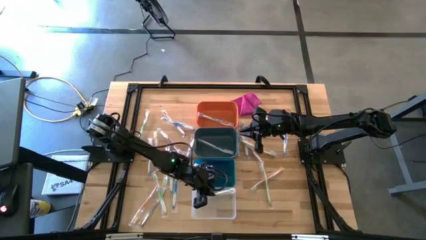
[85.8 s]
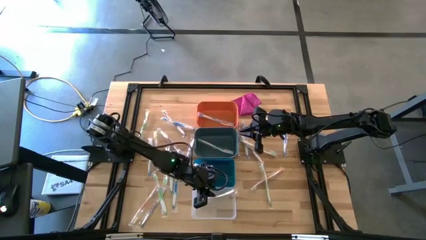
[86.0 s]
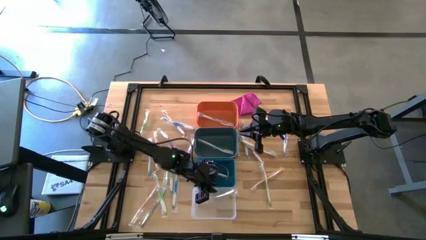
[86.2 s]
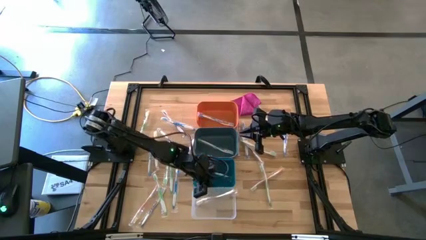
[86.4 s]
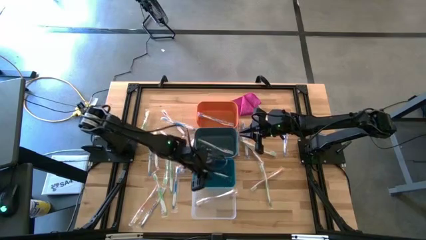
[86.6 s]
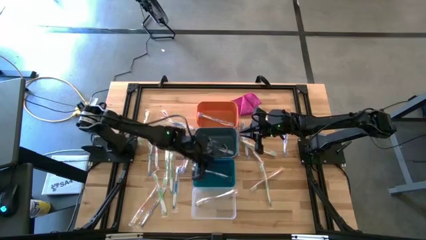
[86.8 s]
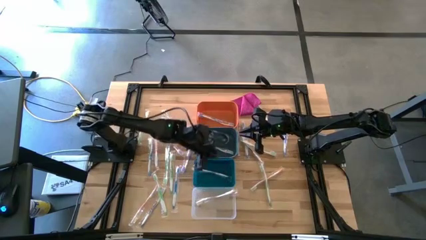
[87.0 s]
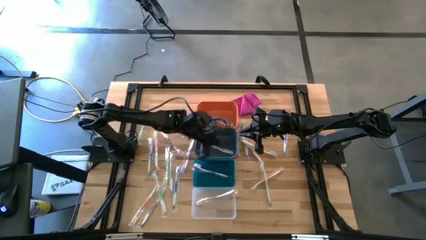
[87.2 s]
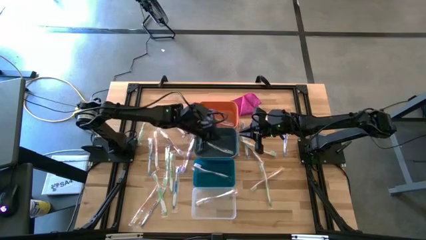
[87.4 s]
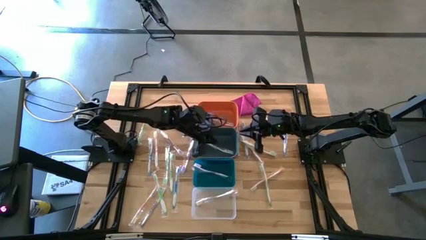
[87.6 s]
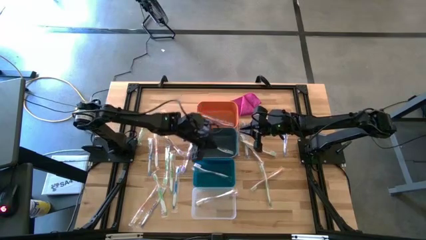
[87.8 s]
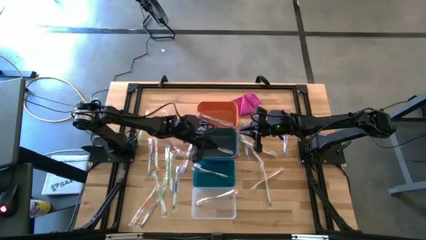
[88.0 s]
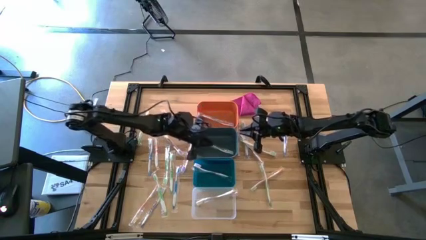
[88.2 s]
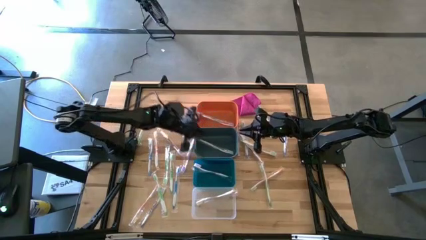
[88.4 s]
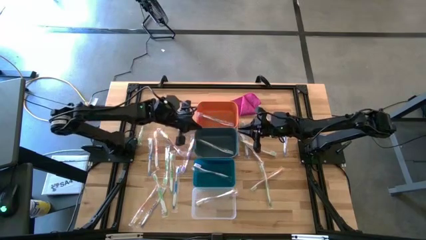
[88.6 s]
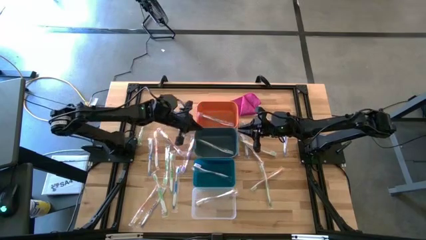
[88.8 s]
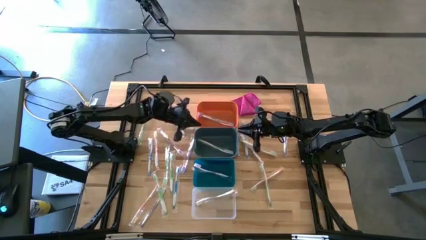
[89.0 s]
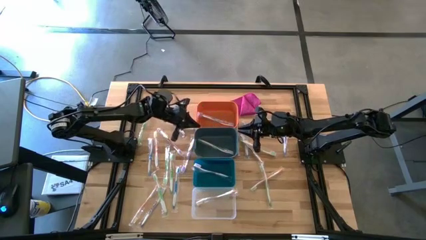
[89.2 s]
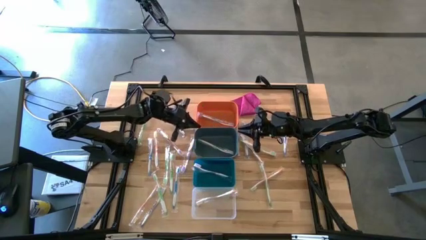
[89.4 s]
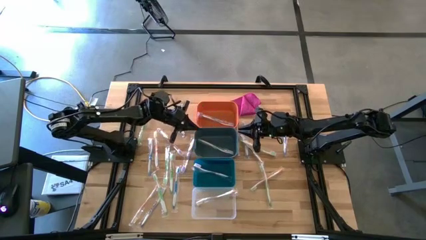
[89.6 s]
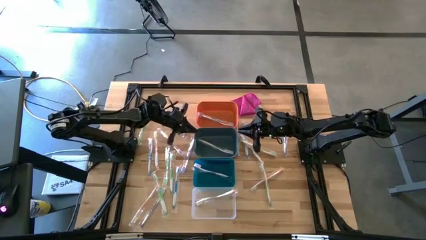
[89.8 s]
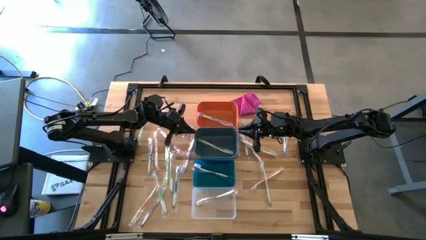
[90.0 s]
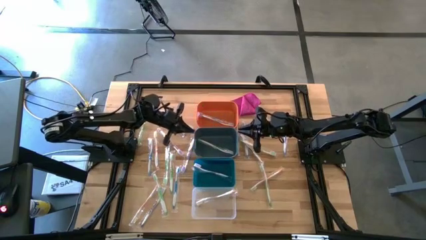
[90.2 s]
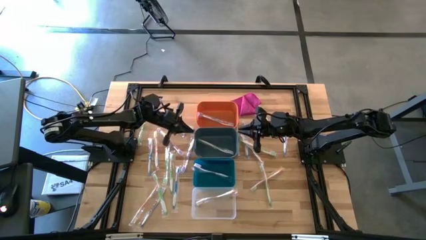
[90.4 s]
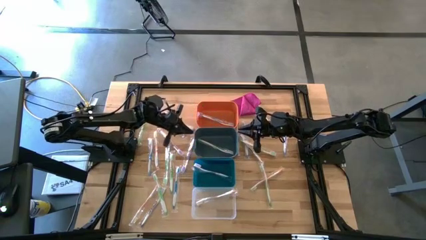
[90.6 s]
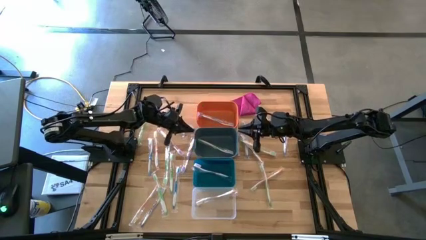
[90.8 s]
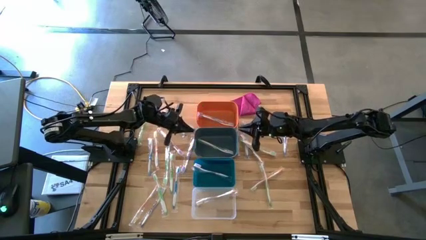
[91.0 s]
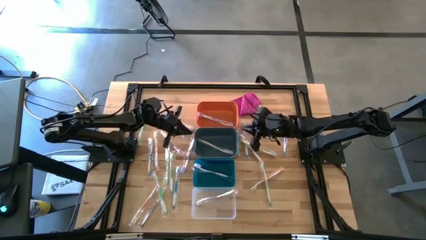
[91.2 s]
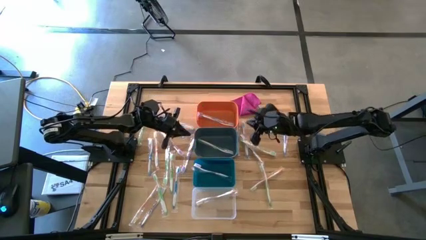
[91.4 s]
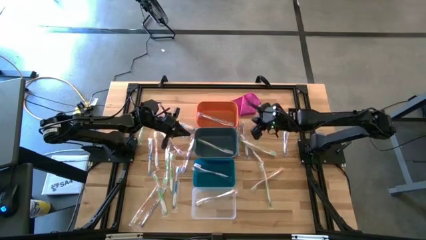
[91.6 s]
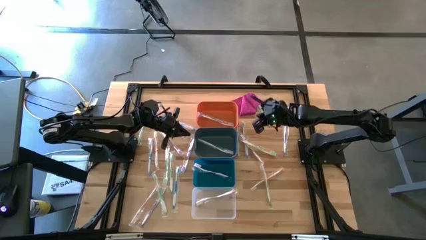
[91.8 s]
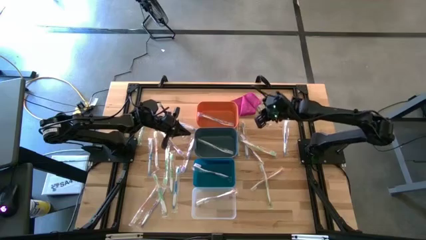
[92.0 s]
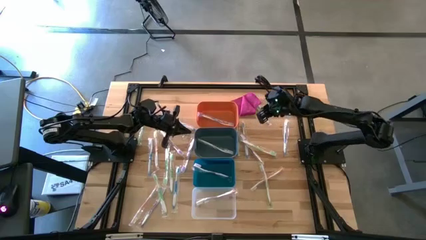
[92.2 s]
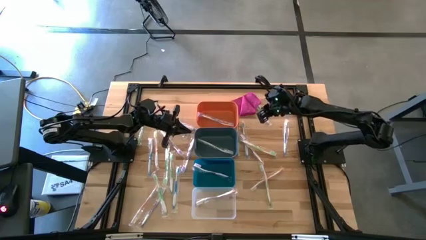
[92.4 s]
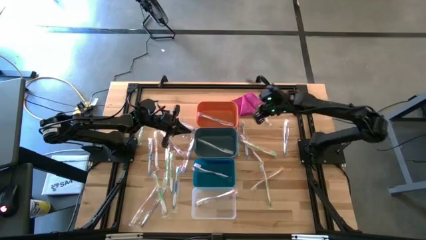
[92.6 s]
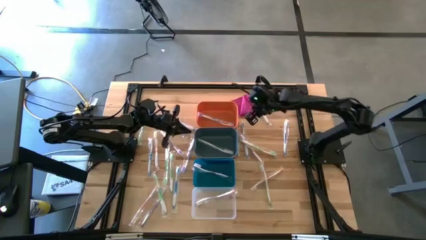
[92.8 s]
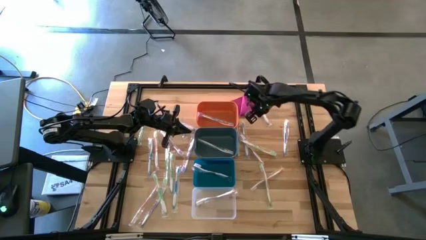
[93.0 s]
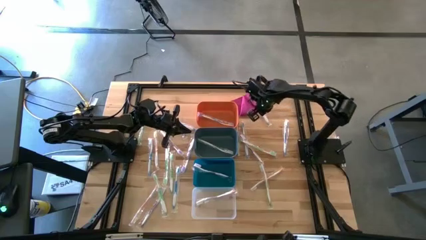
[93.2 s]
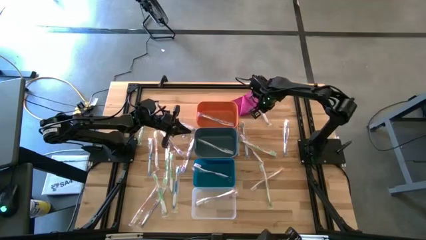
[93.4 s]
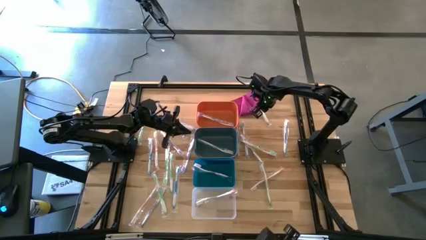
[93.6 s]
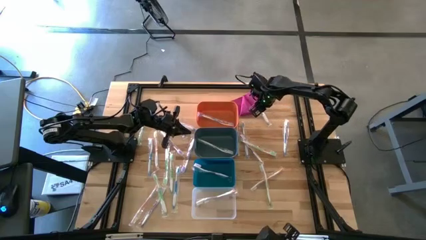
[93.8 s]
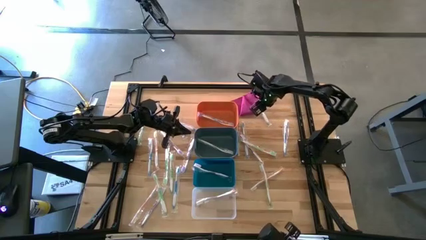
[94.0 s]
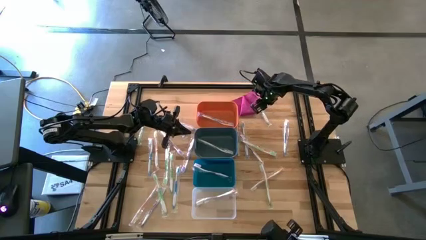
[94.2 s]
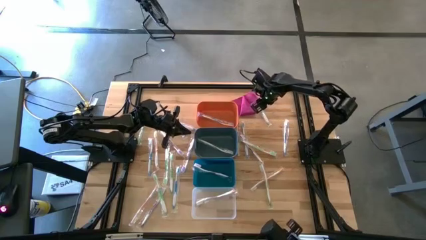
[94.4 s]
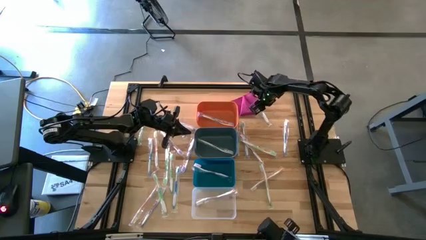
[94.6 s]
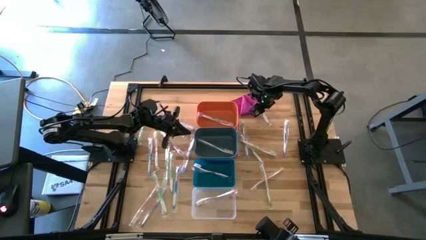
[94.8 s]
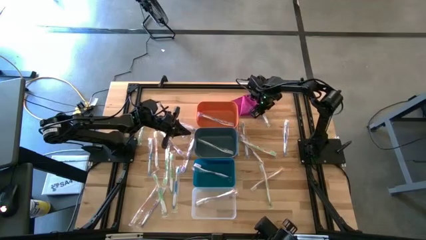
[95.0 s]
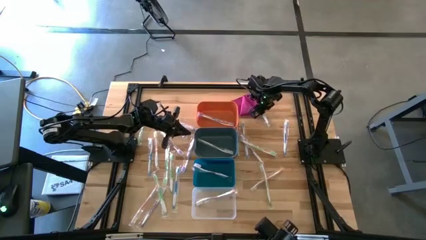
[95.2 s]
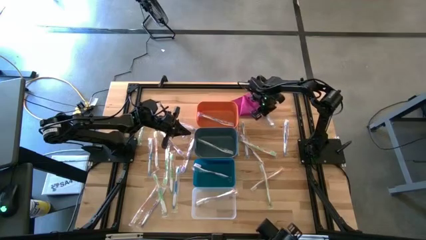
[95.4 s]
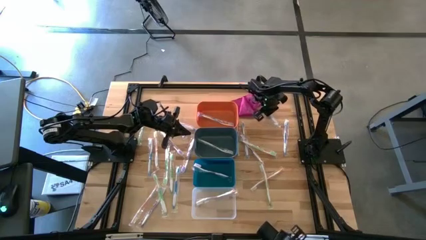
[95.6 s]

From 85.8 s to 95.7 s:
Task: Pick & Place Toothbrushes
Put the green toothbrush into the green bin

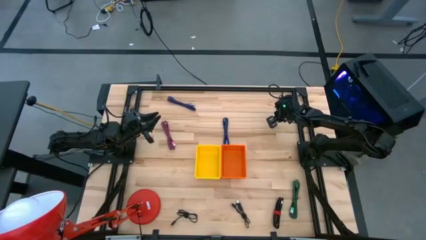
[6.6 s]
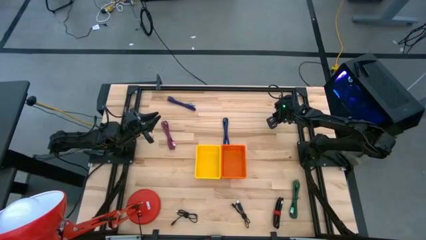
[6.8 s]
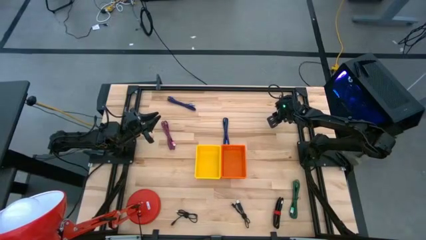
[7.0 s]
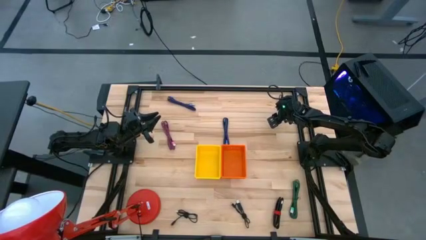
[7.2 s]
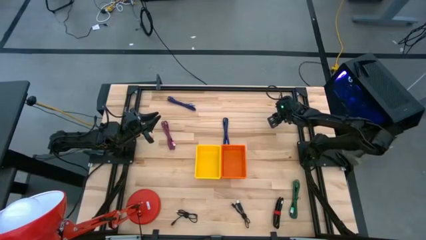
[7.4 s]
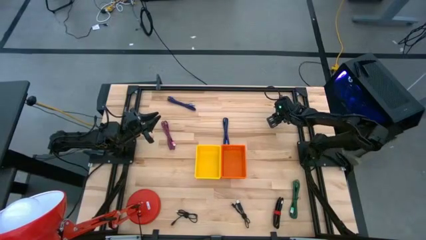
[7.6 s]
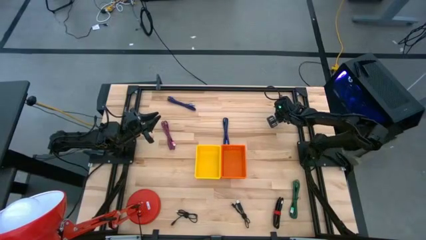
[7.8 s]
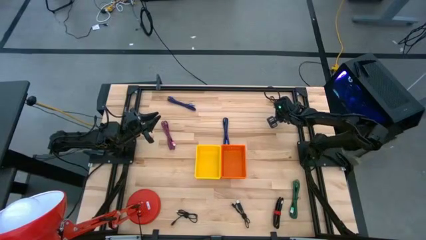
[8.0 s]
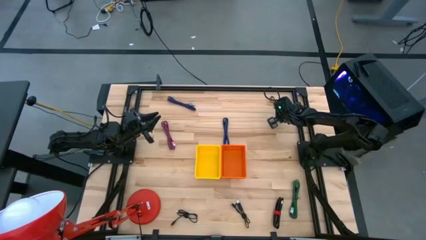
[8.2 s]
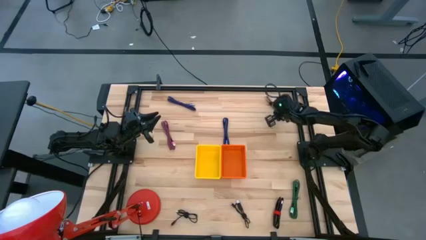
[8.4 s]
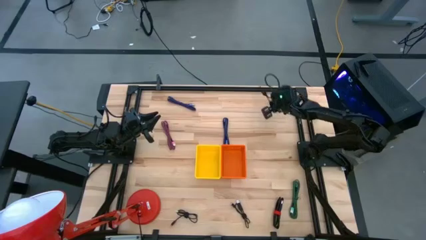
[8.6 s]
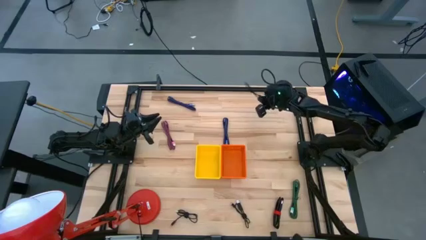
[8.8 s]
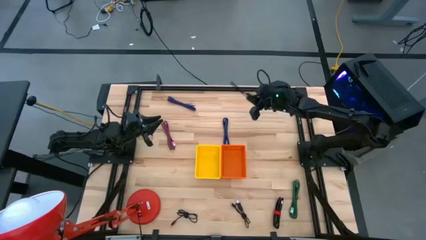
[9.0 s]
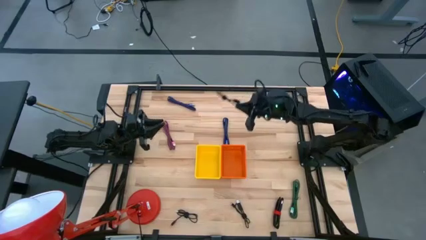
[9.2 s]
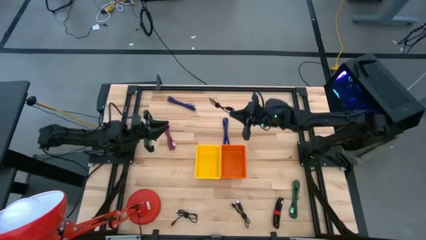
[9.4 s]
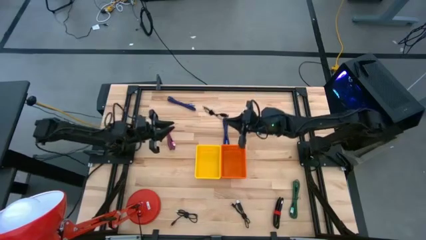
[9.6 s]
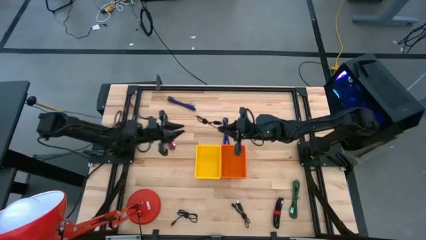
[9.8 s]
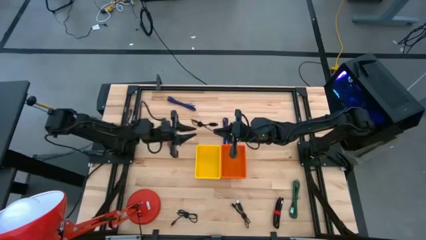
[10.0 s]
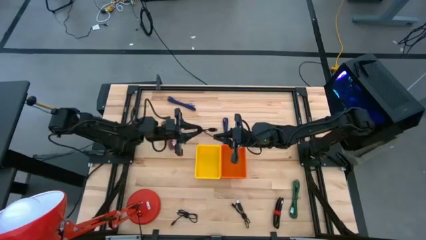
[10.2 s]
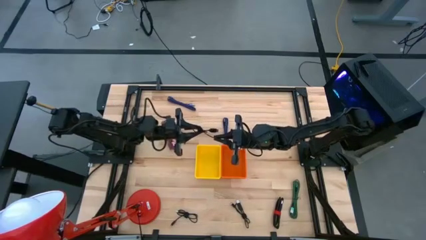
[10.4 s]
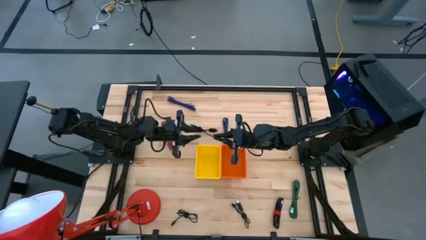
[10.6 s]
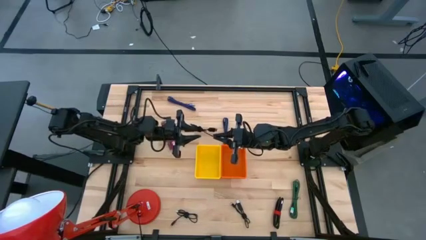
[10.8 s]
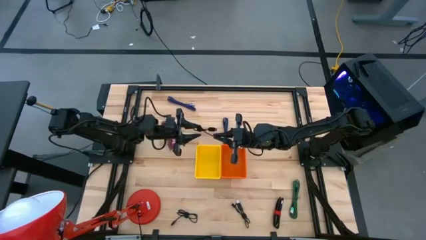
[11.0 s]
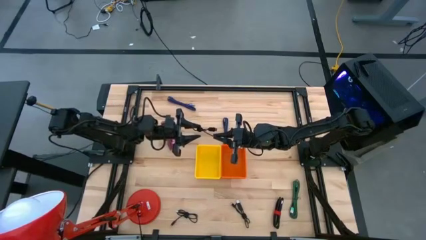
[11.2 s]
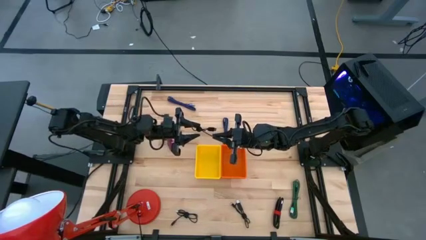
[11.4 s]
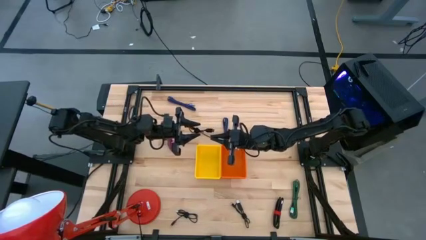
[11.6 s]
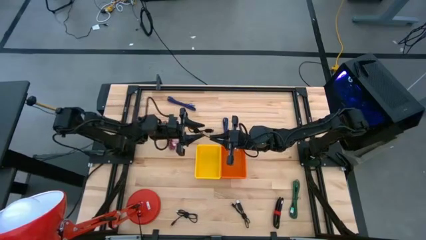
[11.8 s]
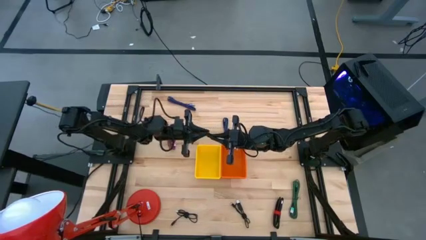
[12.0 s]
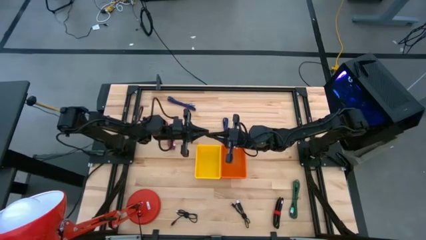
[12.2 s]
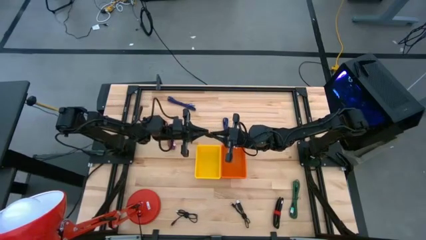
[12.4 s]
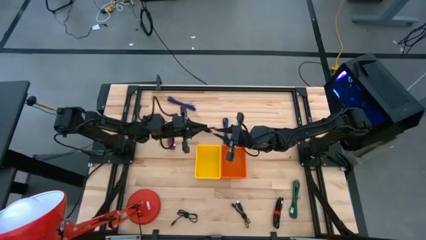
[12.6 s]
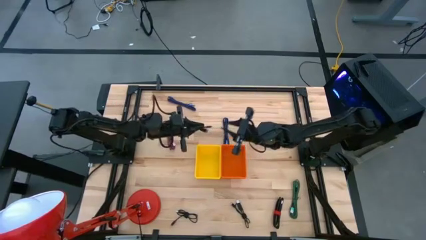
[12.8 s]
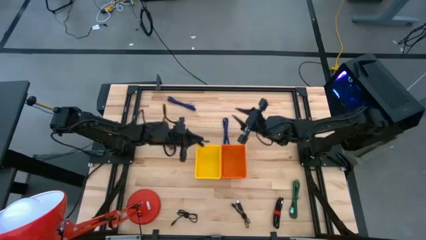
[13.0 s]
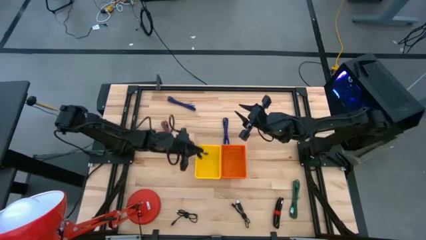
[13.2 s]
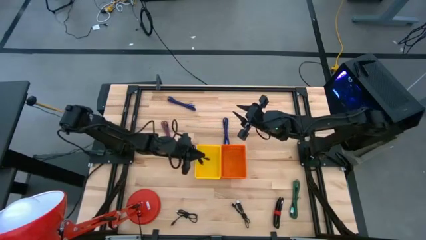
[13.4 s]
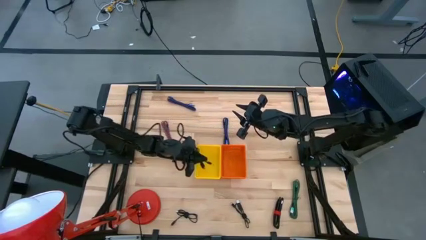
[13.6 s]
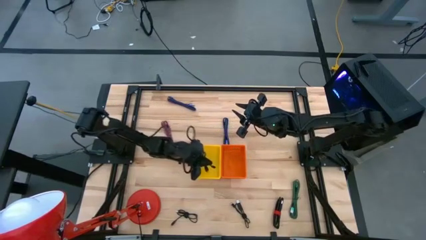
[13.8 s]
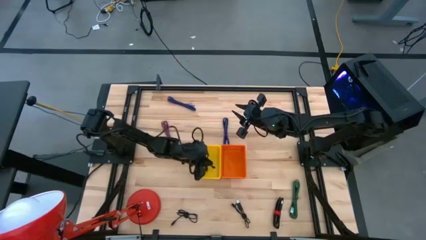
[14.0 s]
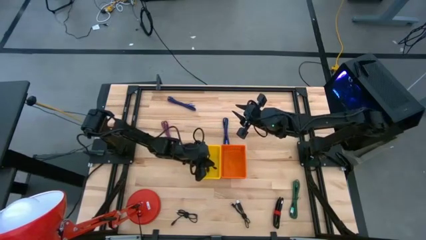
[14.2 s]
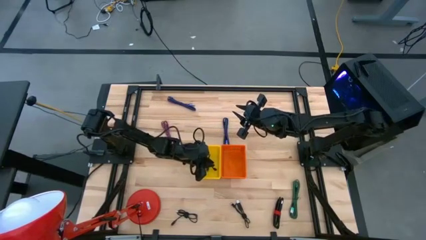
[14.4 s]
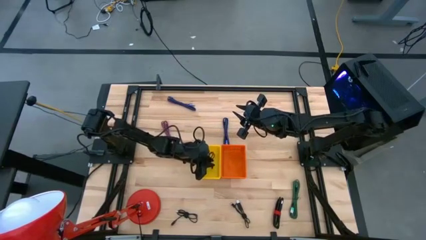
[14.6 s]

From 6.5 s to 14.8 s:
Task: Pick & Place USB Port
Put the top black charger cable into the yellow bin
